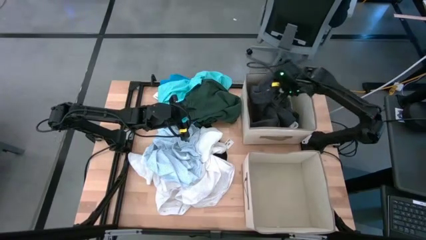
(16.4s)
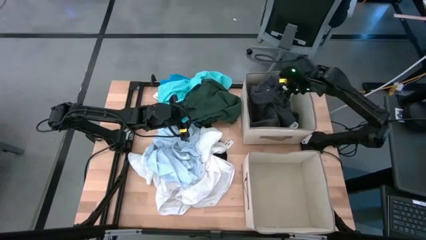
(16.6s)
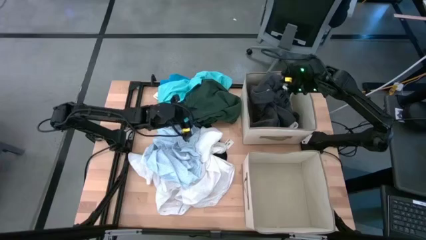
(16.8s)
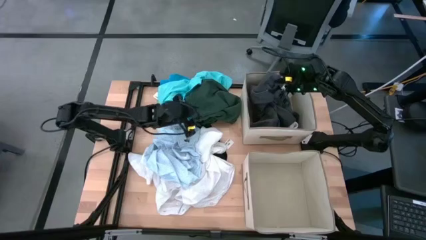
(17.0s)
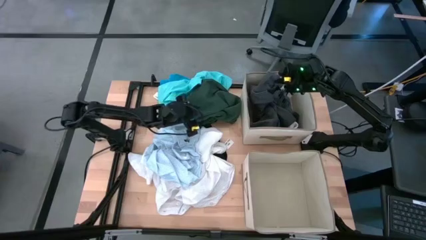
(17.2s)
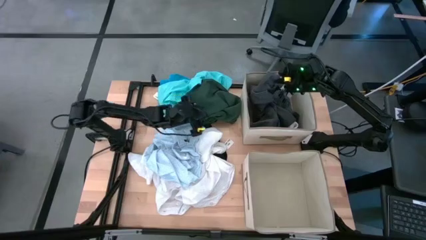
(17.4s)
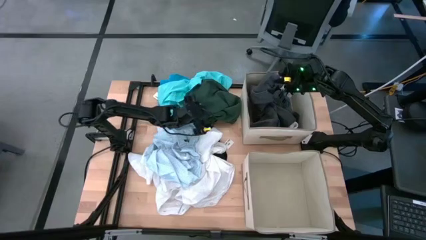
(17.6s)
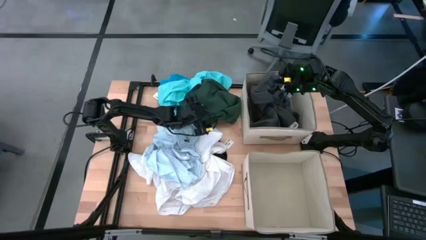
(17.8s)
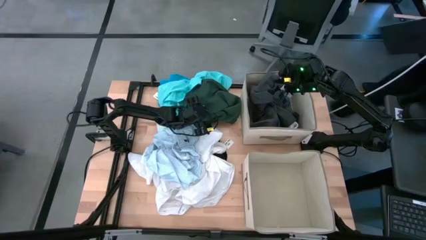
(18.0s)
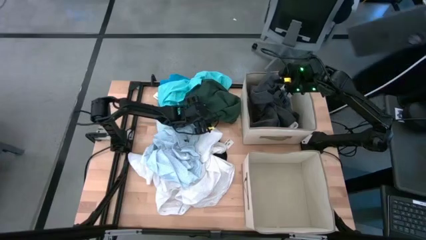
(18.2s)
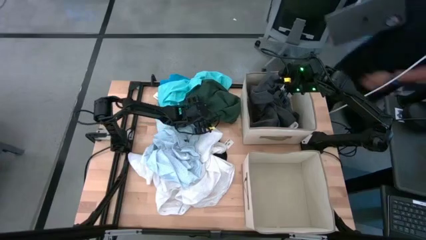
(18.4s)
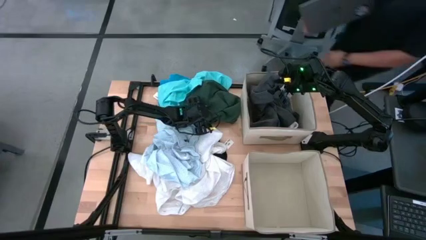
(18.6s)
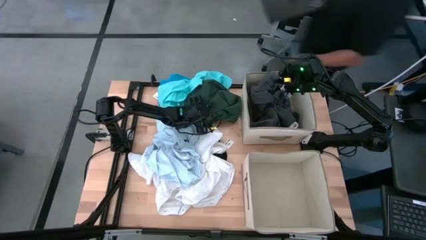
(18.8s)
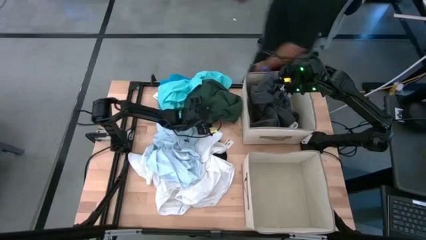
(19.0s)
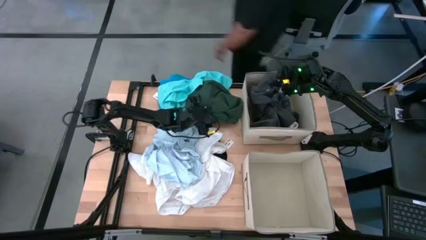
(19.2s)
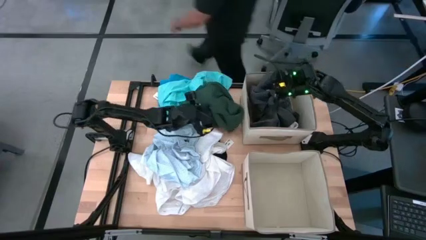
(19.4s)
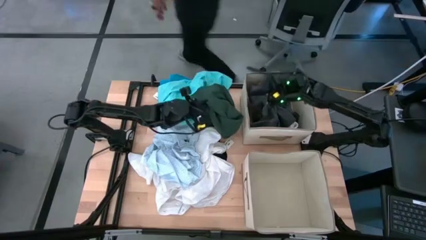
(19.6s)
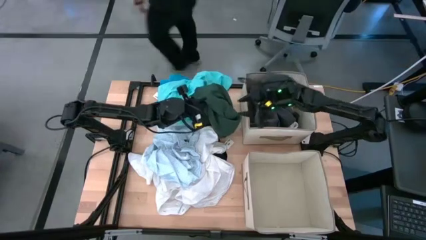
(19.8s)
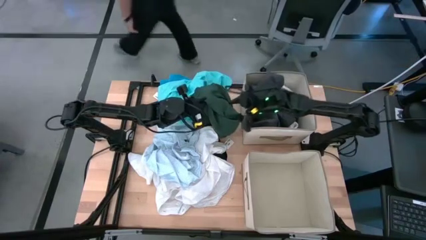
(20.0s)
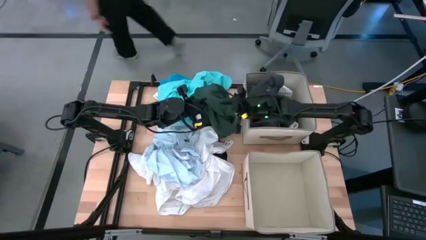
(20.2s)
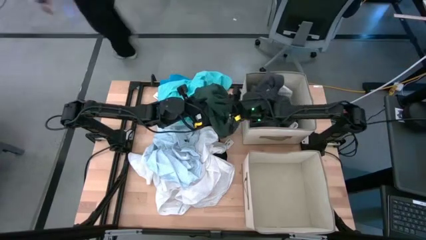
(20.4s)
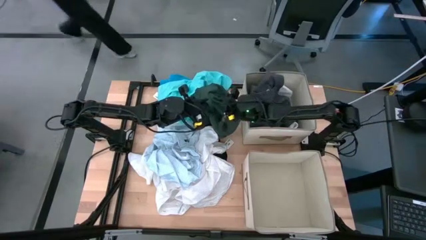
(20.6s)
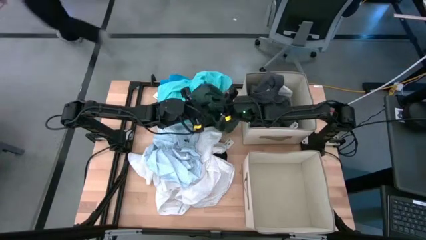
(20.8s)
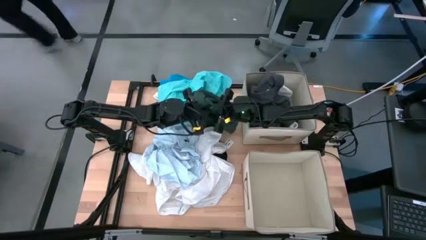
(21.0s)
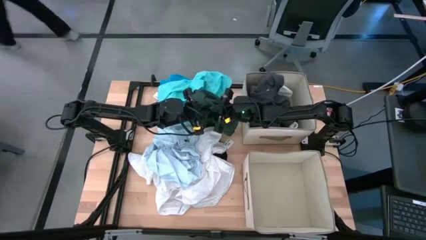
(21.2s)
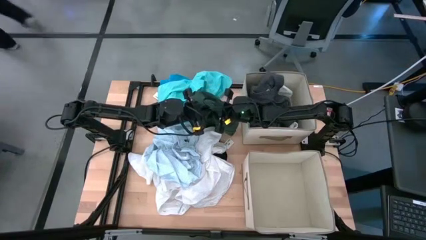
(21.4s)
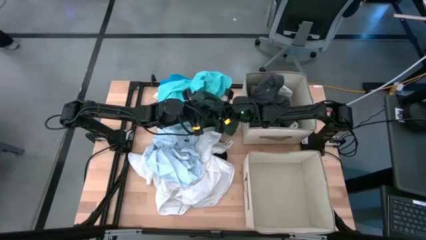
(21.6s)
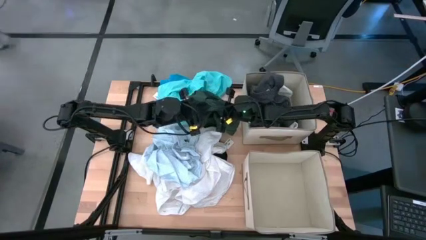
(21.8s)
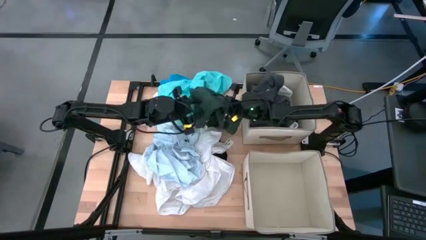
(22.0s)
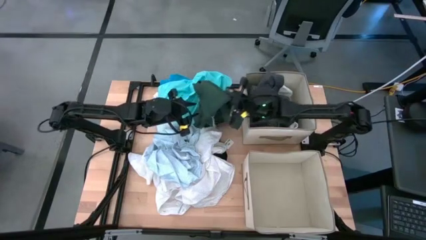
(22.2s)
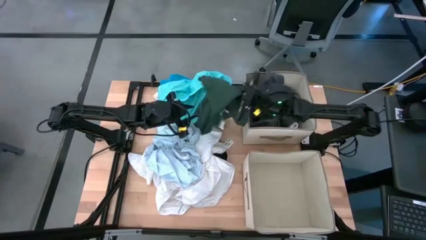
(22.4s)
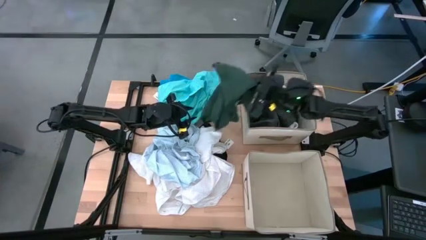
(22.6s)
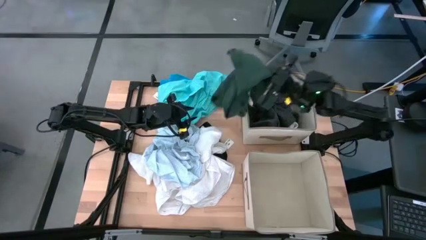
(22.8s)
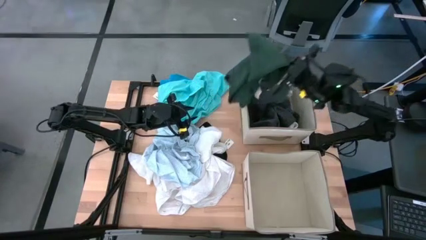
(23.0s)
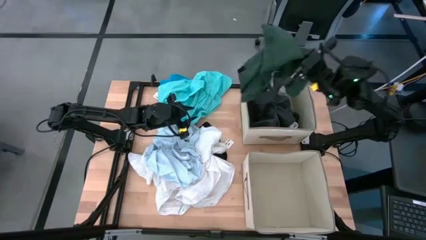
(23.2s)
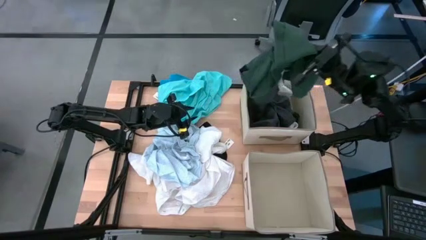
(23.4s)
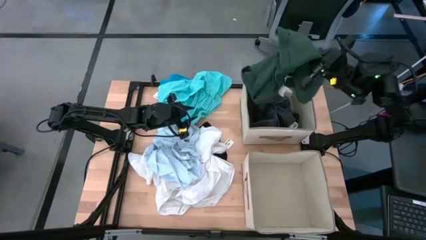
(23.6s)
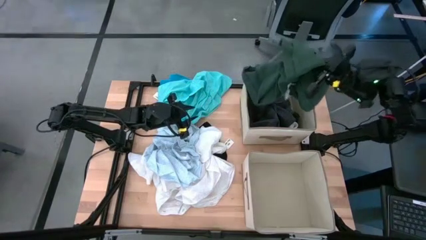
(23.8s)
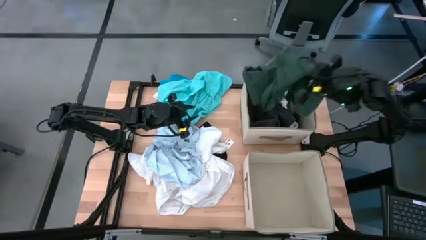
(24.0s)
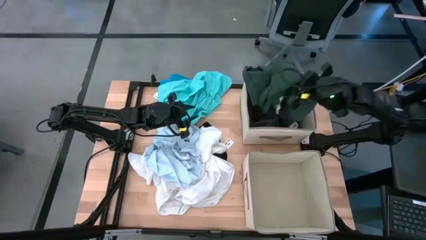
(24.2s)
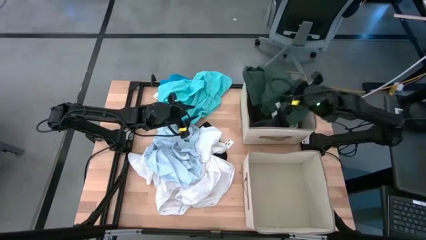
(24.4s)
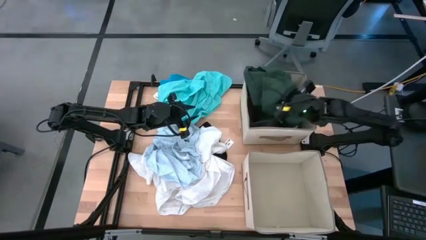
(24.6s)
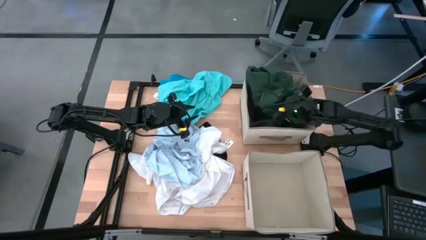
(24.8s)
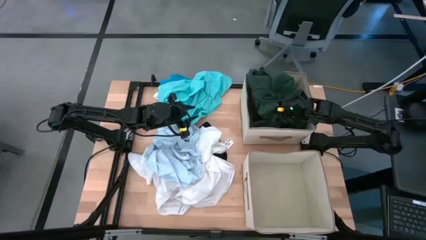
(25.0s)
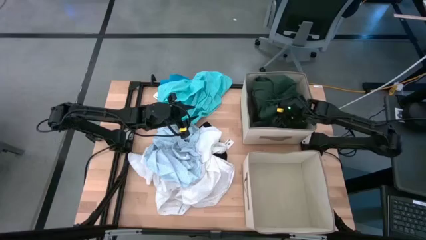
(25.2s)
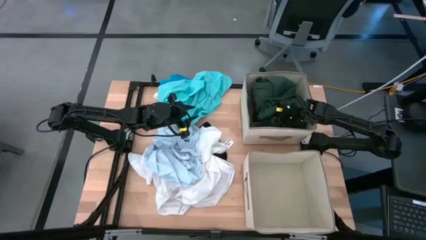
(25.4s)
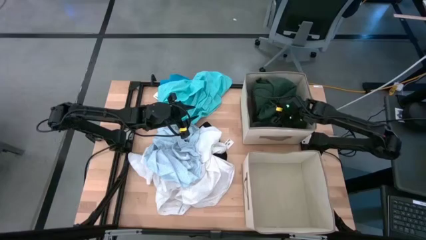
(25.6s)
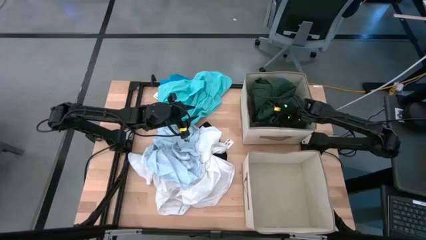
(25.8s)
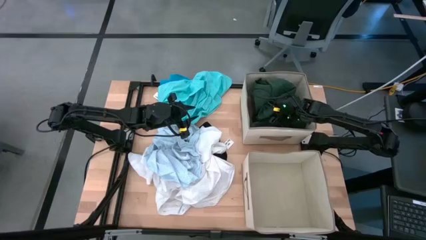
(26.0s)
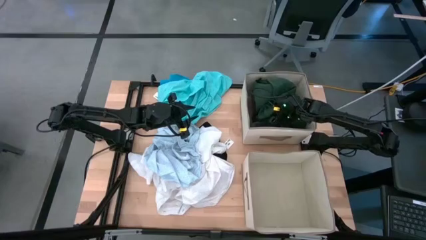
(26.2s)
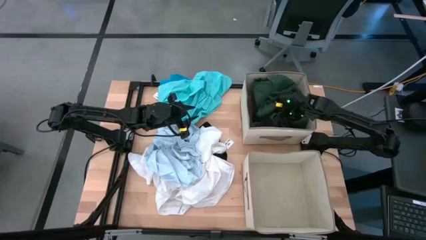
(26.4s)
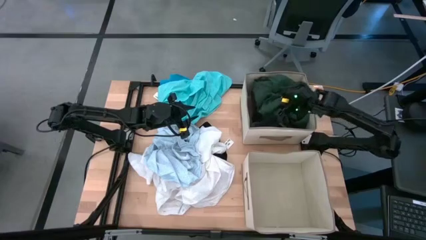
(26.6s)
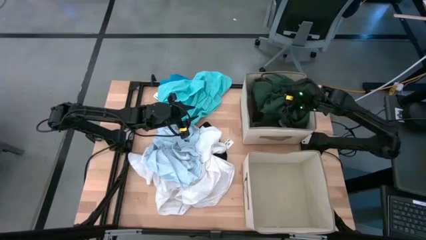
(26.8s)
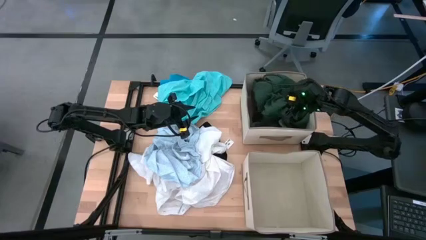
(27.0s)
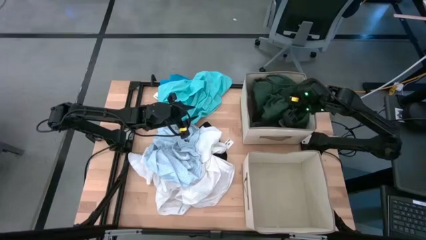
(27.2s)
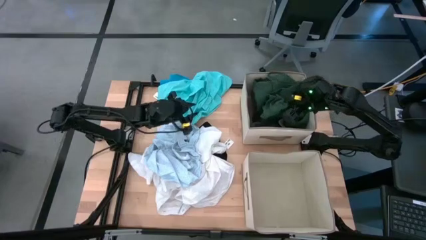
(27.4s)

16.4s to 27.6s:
Task: Sort clothes
Put the dark green shirt into the top bin
